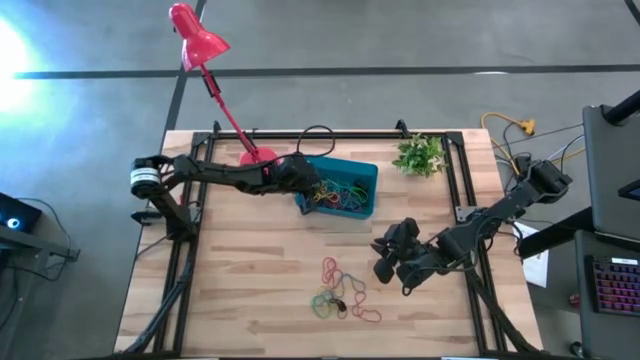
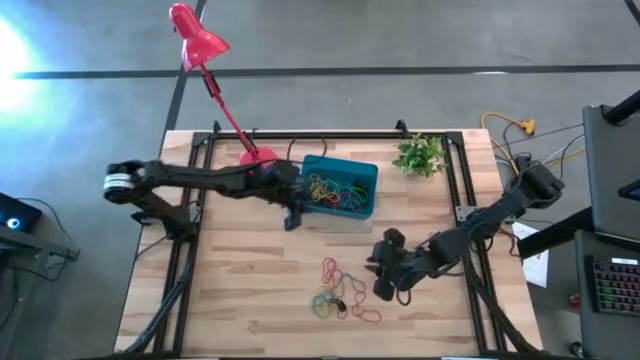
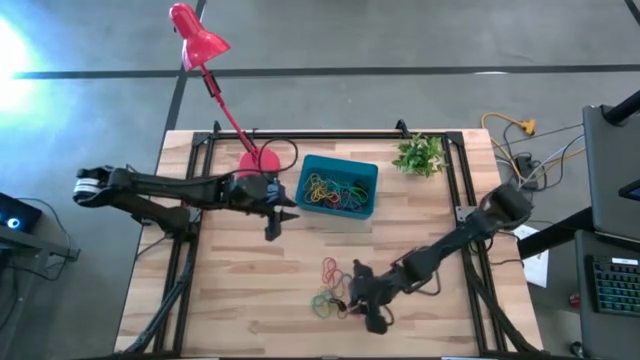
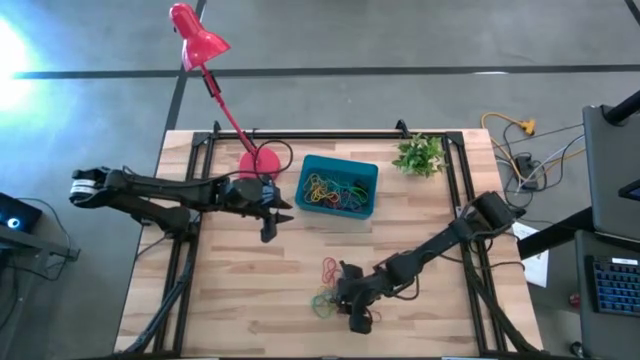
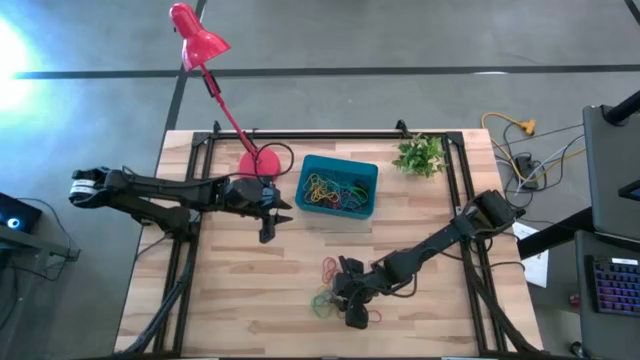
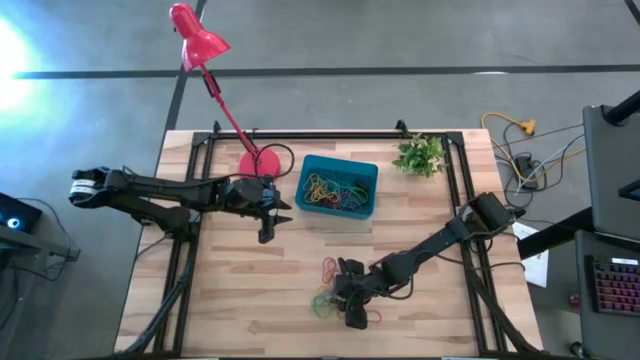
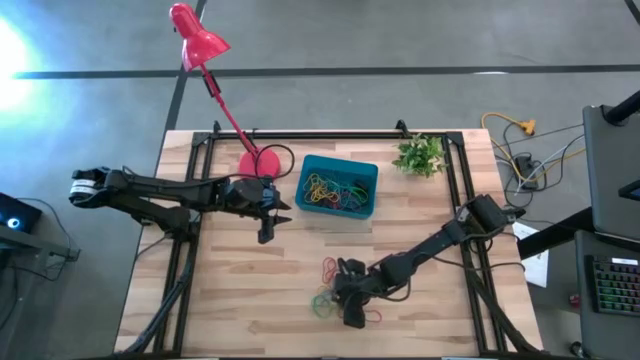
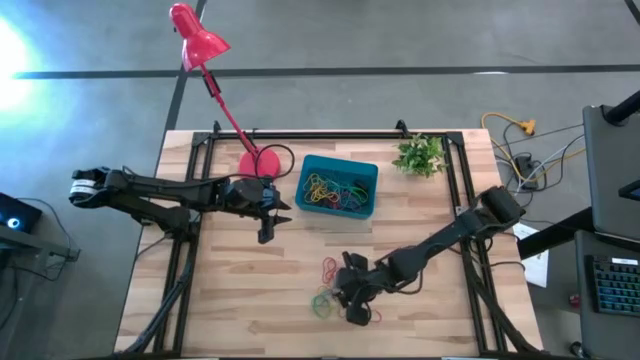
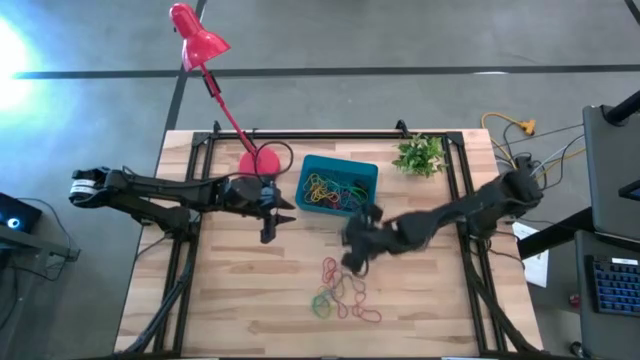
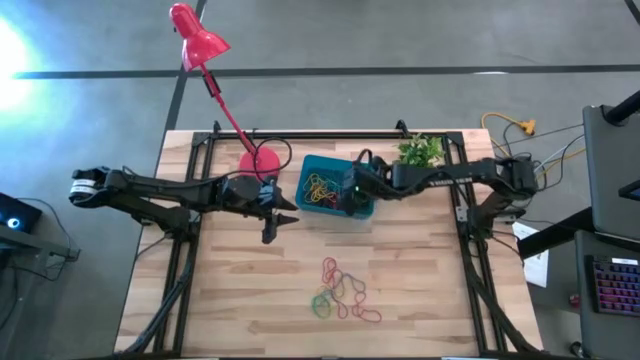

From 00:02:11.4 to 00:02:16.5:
Task: Pick and place rubber bands into bin
Put the black rubber band into the blue bin

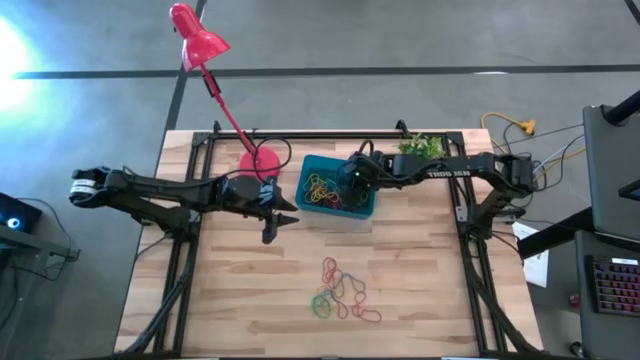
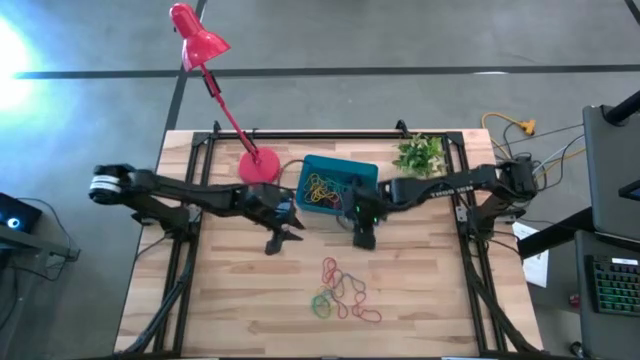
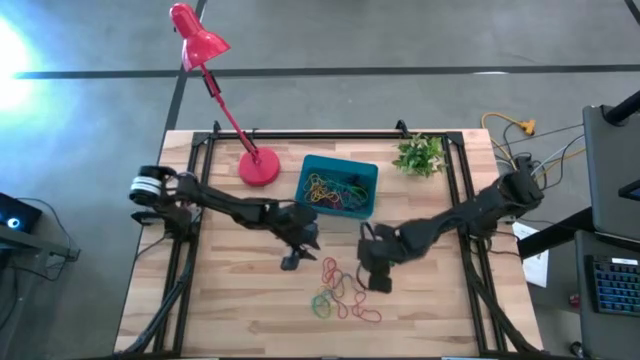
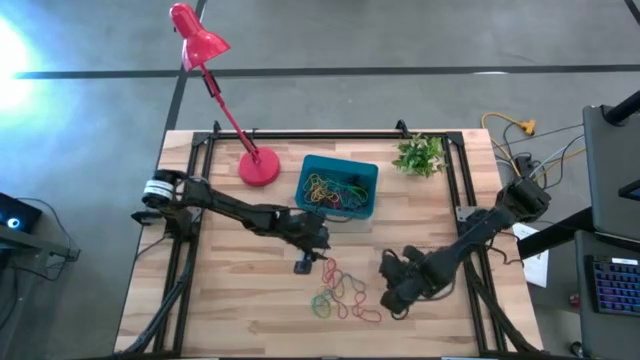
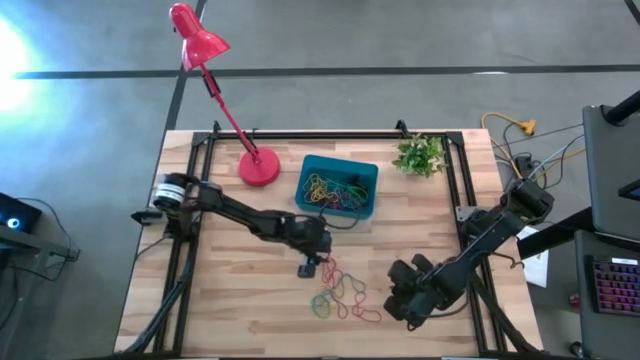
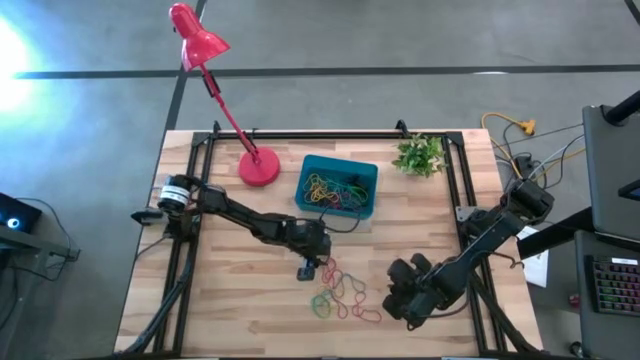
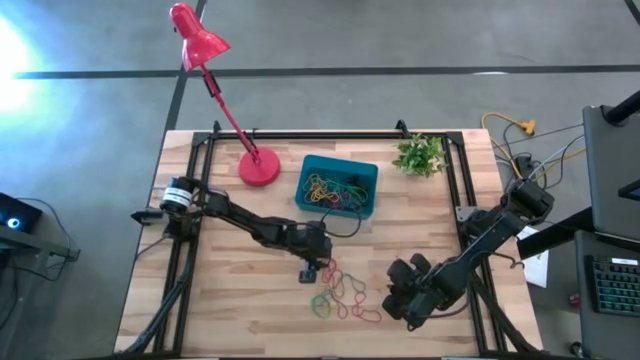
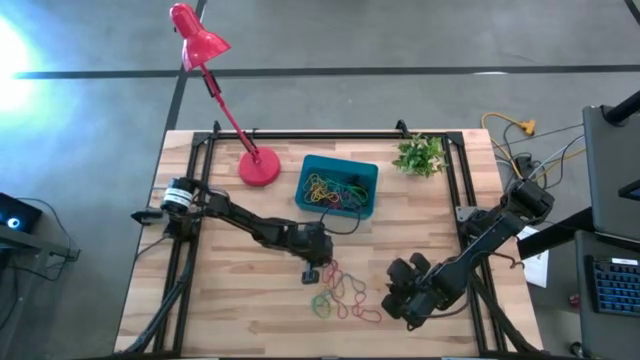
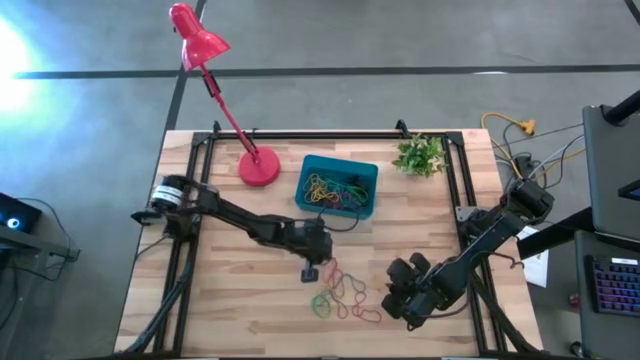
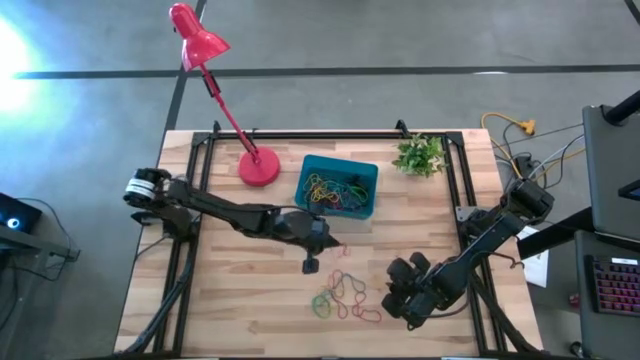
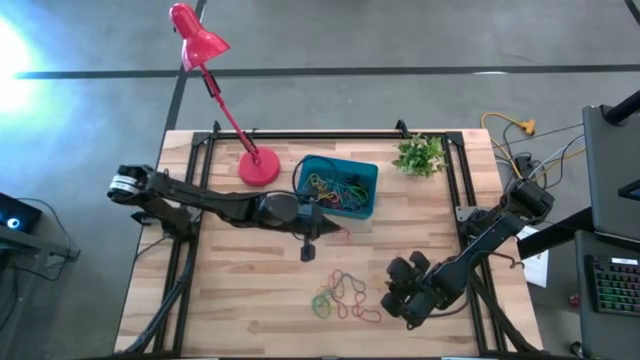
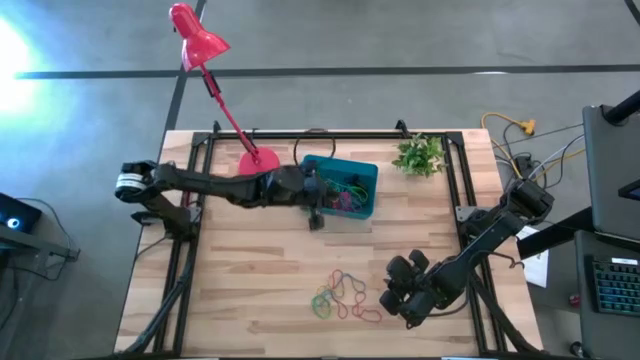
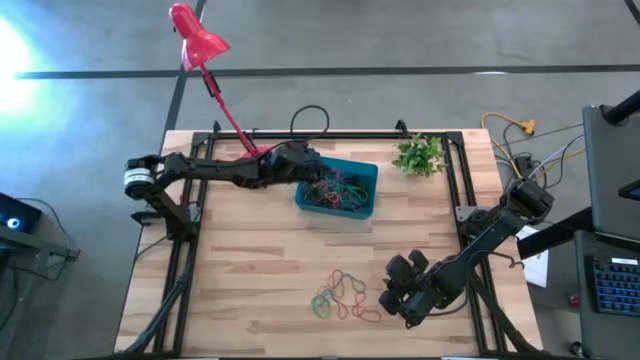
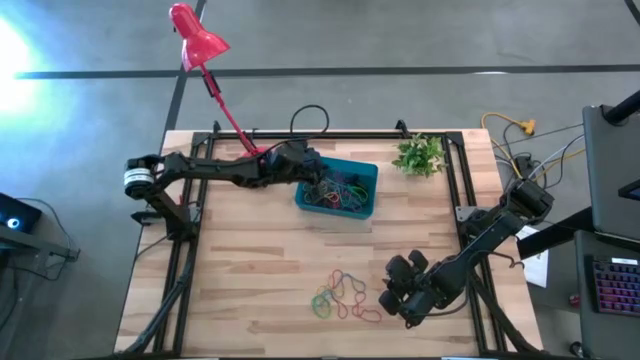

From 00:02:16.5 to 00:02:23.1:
Put the red rubber band into the blue bin

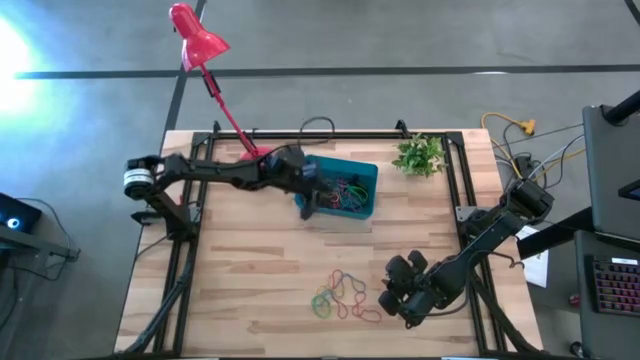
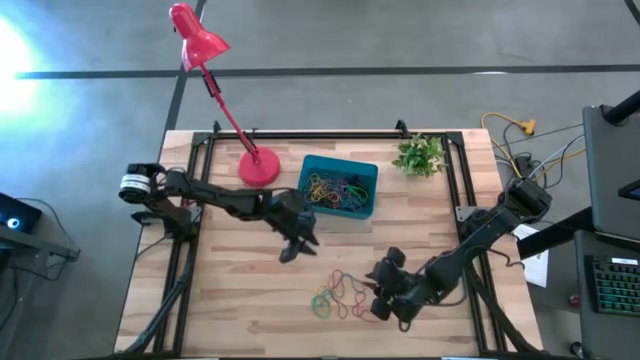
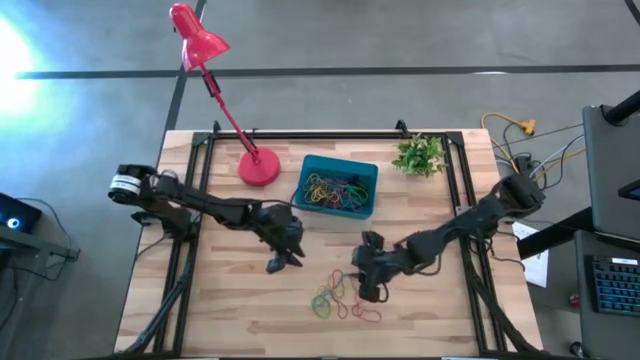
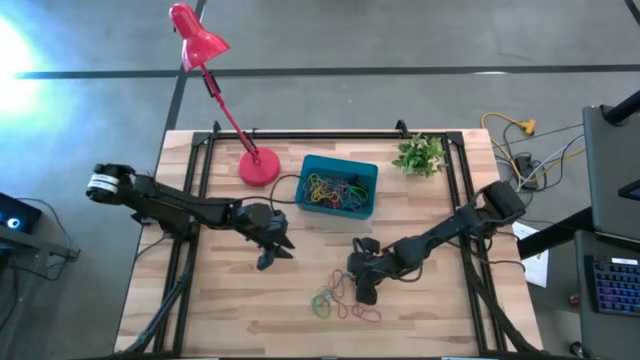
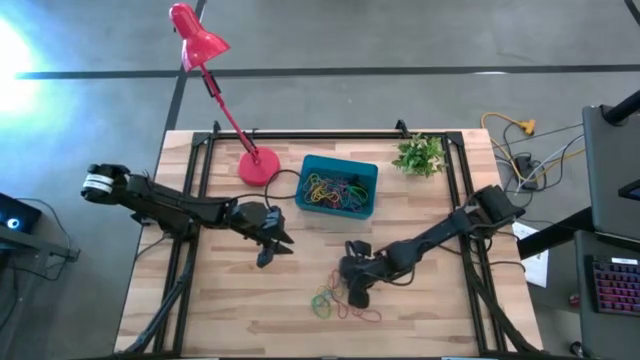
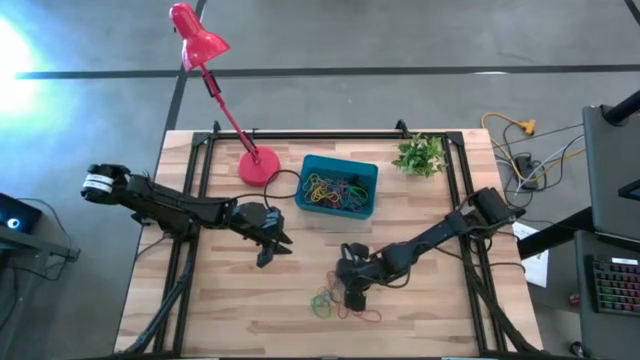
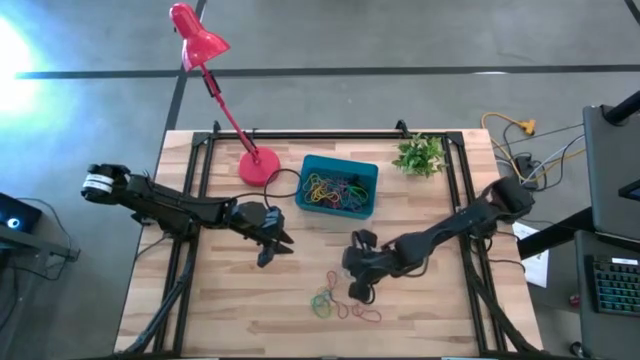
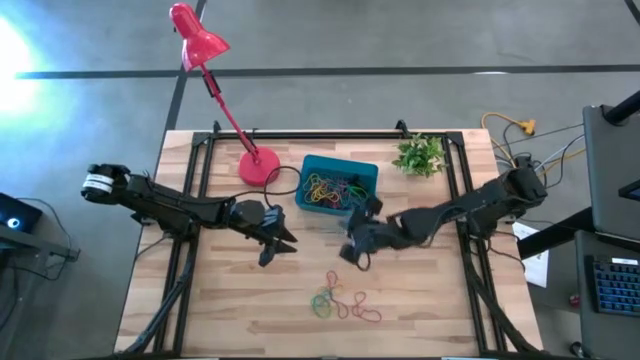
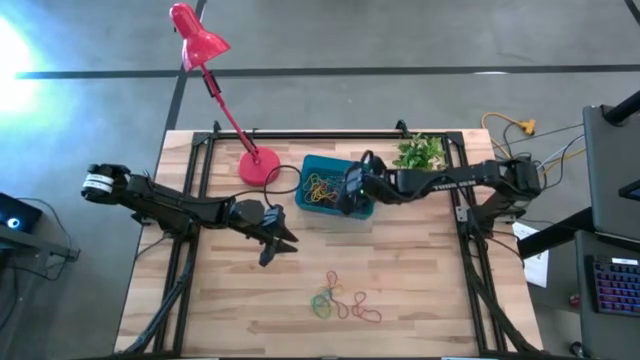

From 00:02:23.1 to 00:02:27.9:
Put the blue rubber band into the blue bin

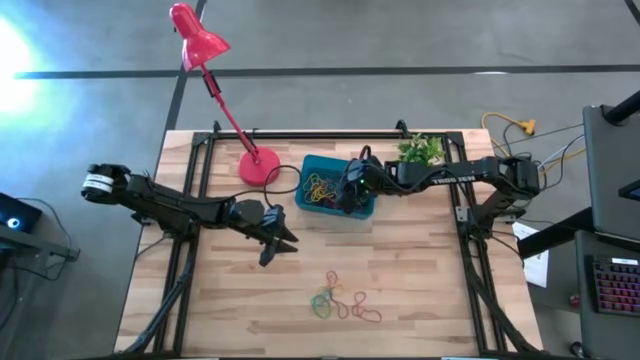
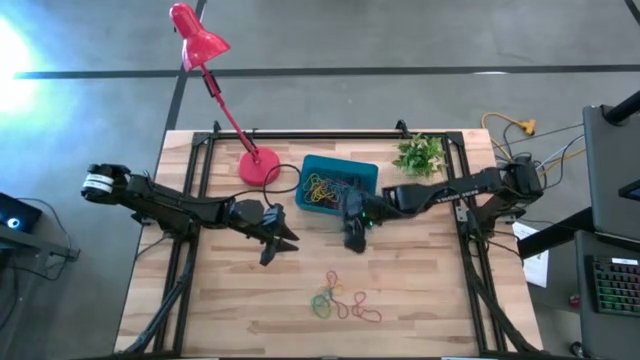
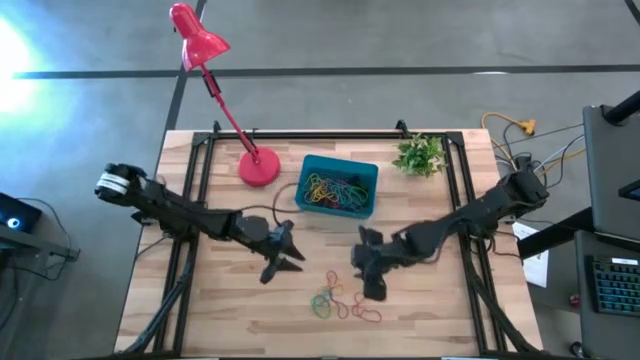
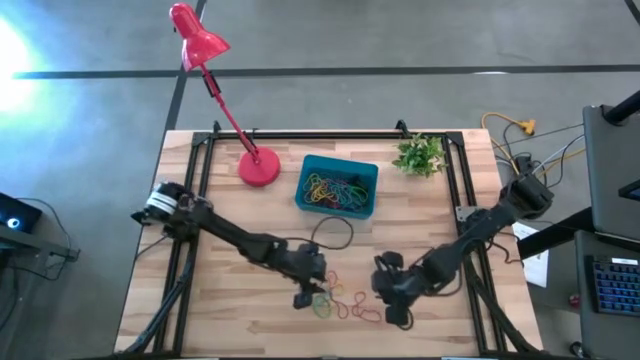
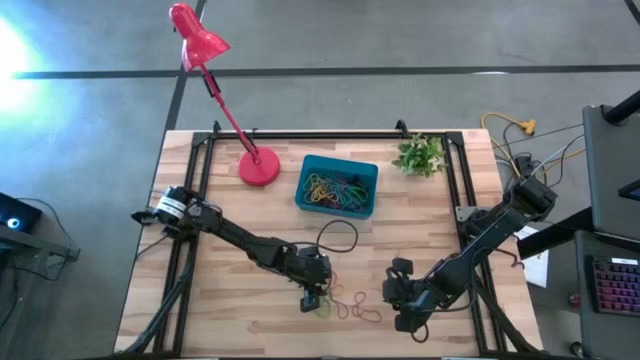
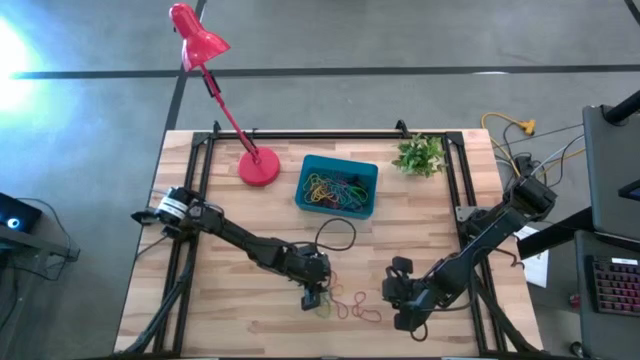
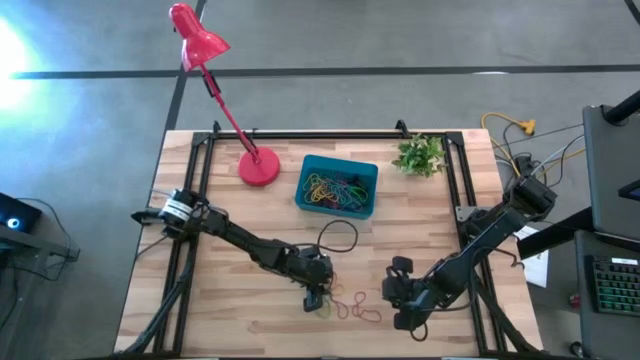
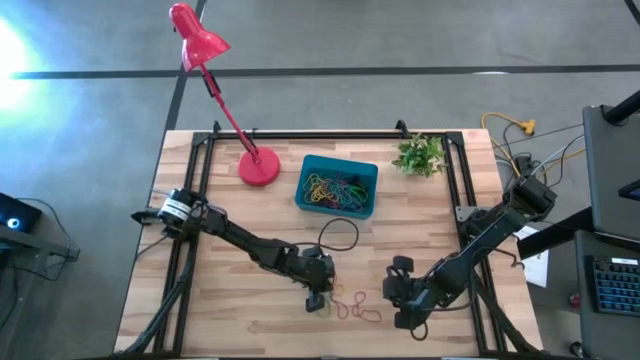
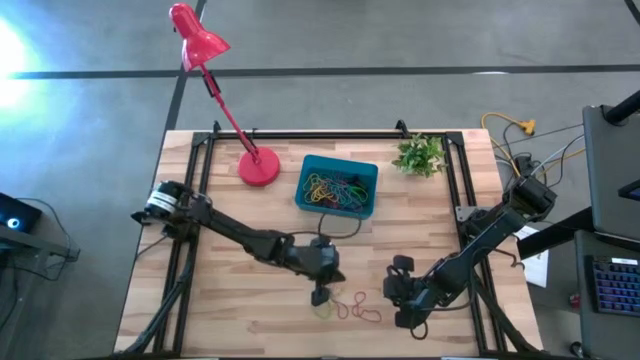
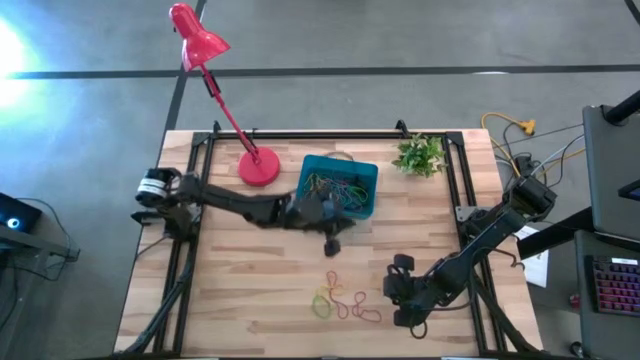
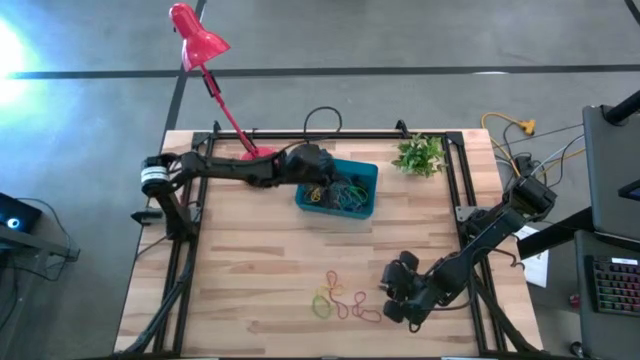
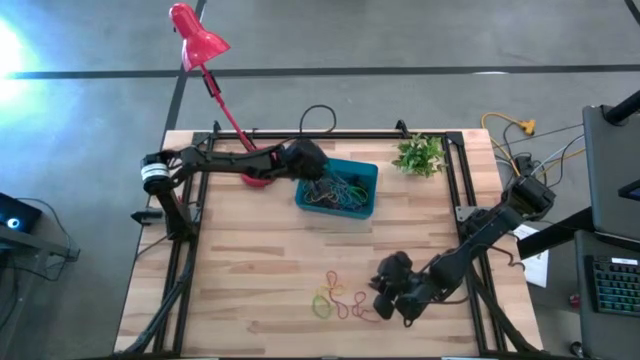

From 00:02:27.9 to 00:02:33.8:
Put the blue rubber band into the blue bin
